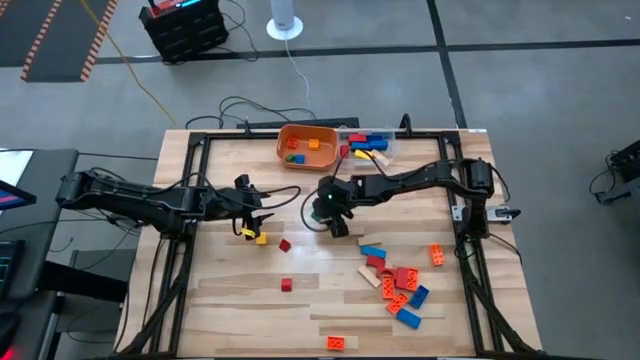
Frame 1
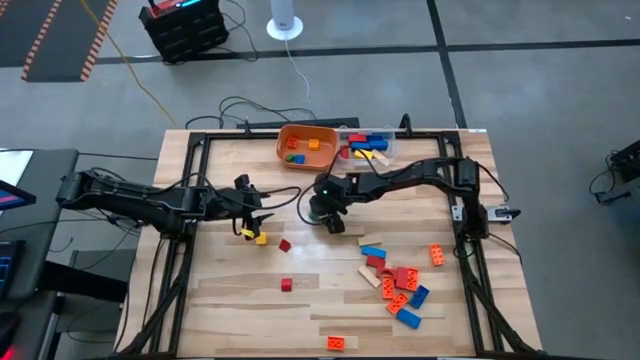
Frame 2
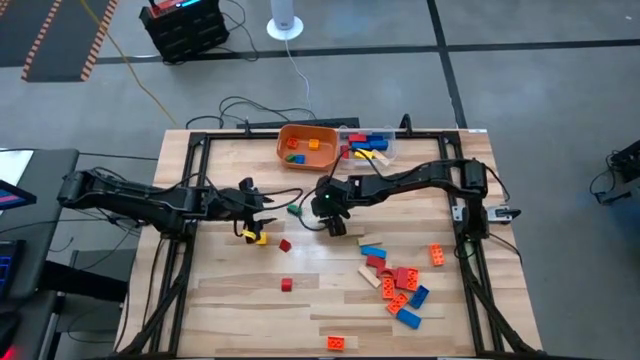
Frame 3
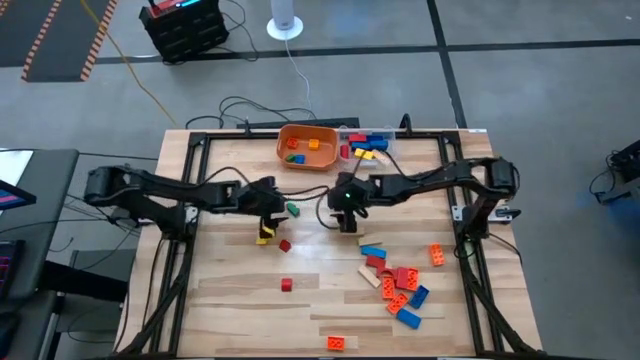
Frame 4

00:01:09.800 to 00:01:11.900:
Task: Sort blocks by size
Put the green small game piece into the orange bin

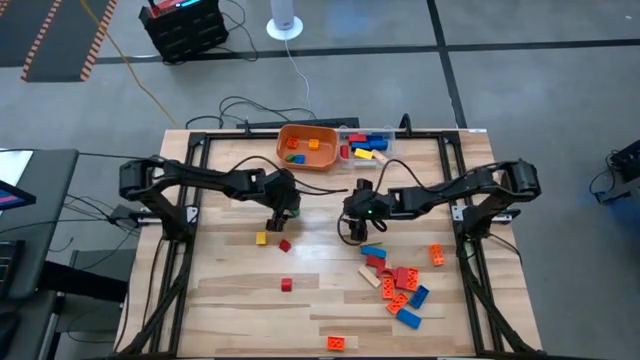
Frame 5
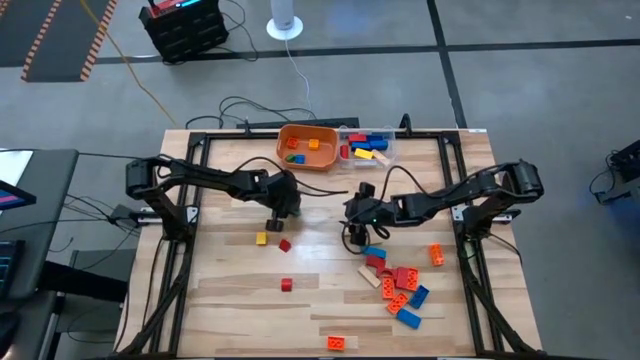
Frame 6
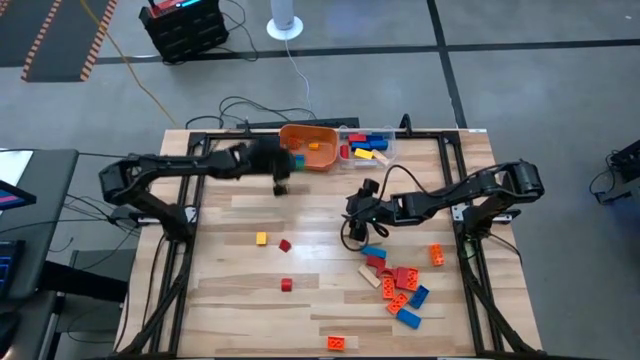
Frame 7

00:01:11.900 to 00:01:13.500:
Put the green small game piece into the orange bin

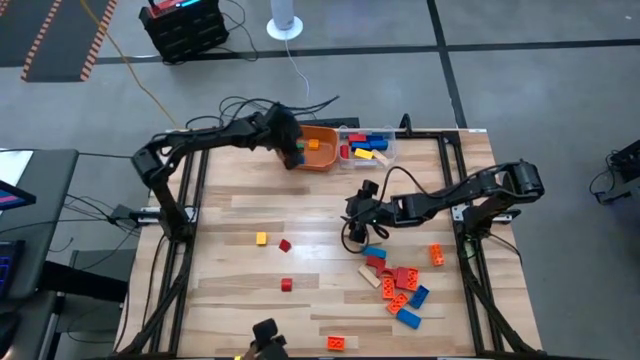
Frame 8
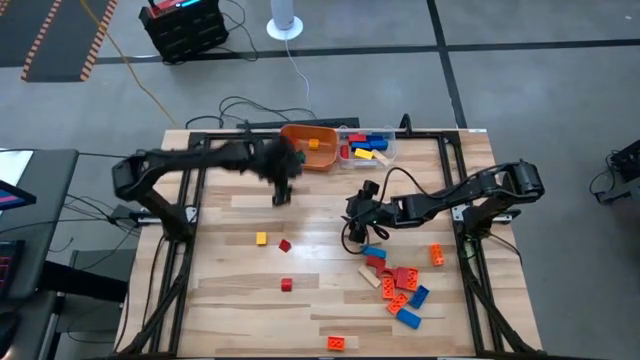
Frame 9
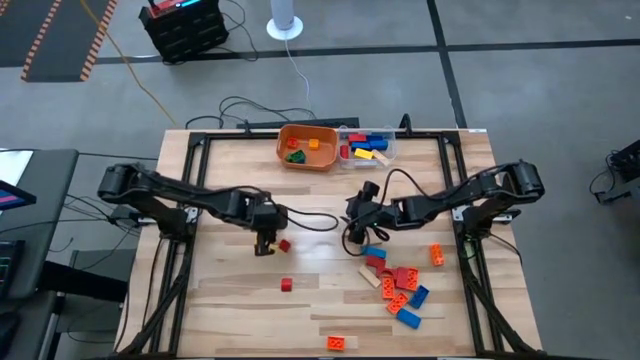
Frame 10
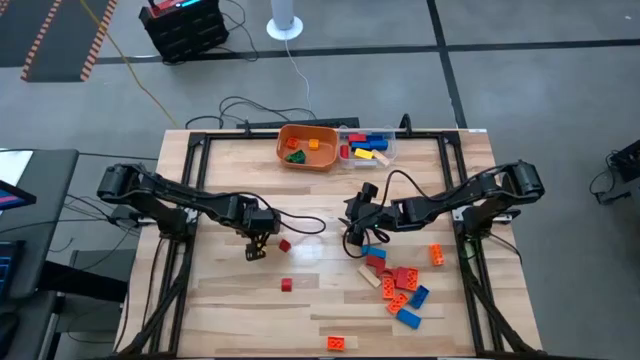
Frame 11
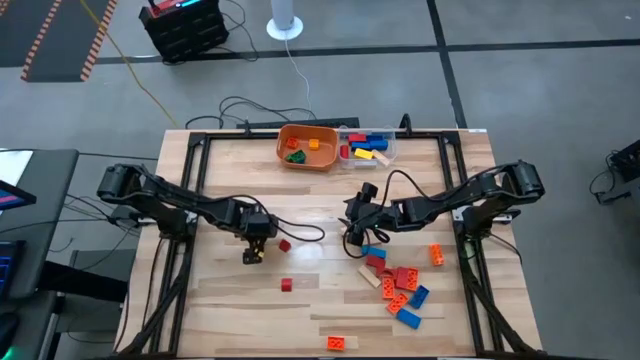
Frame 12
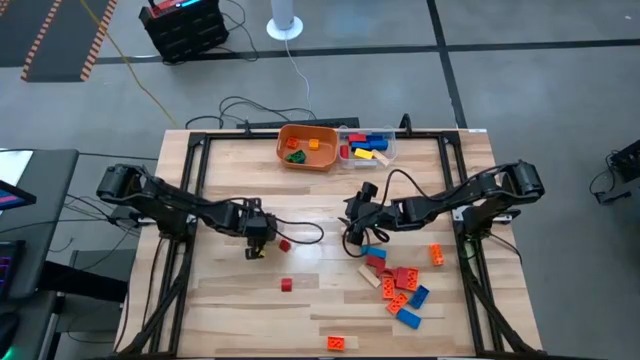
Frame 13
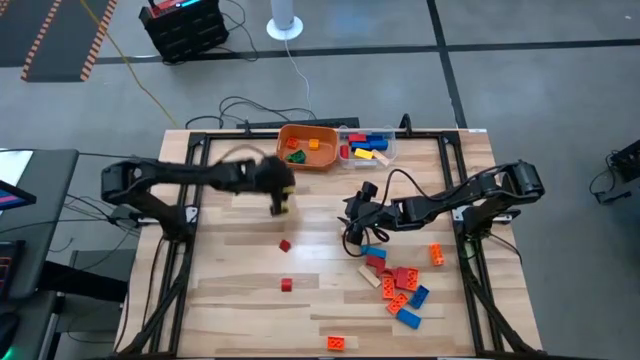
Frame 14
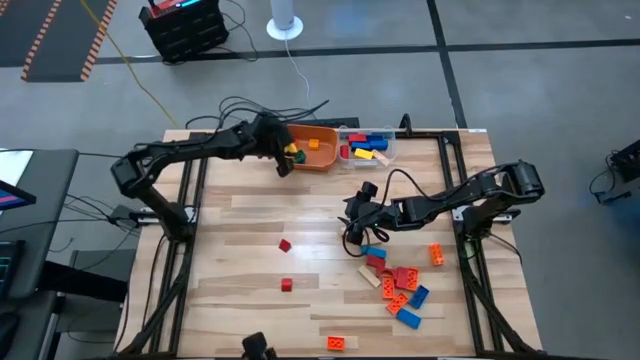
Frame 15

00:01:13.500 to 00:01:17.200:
Put the yellow small block into the orange bin

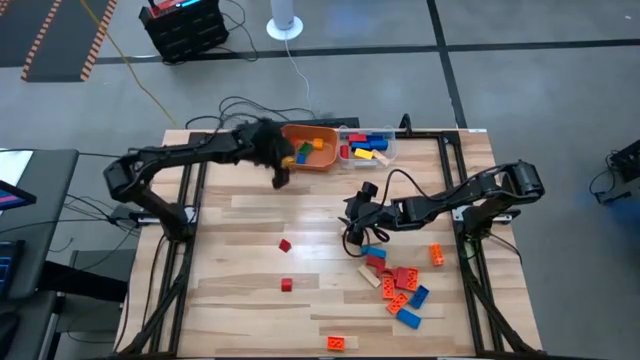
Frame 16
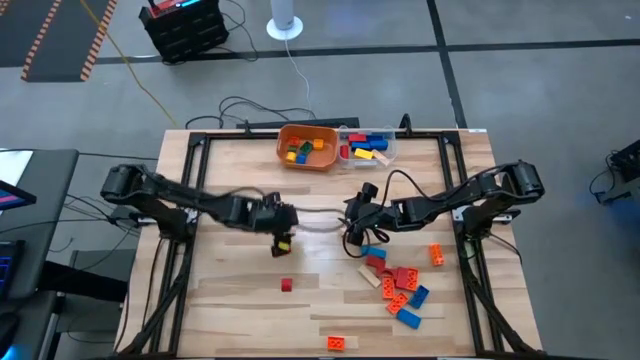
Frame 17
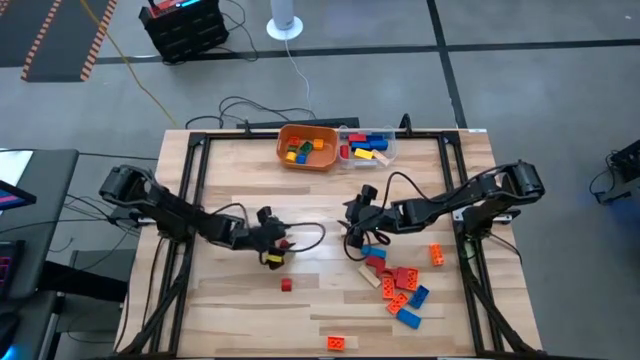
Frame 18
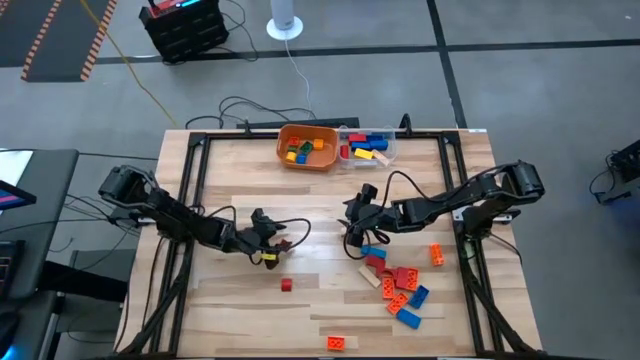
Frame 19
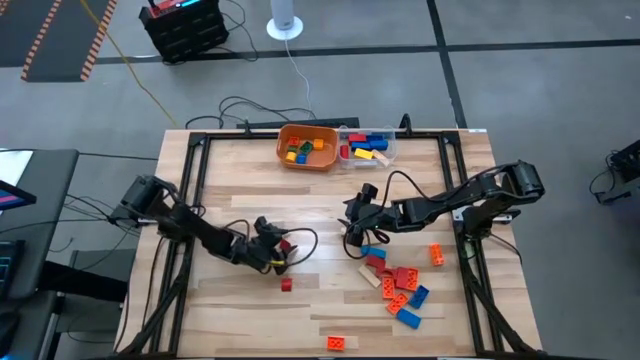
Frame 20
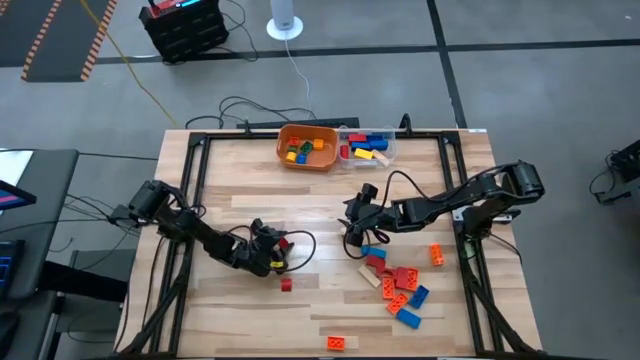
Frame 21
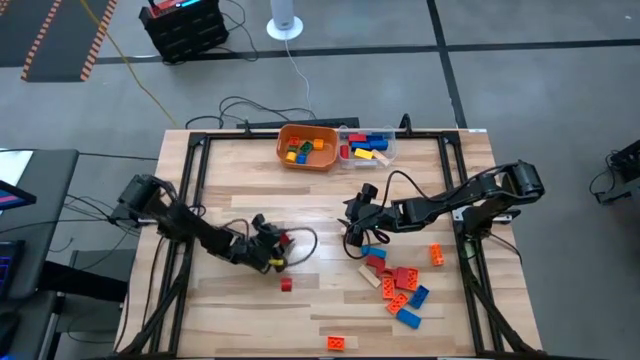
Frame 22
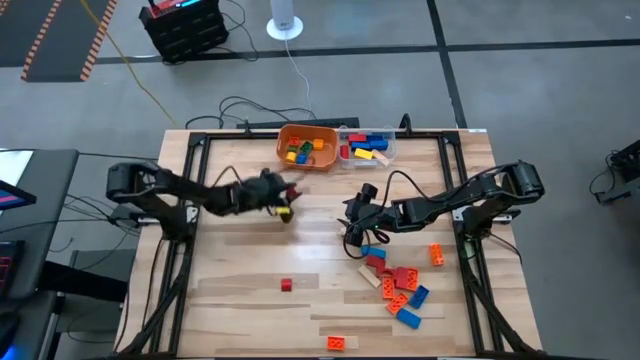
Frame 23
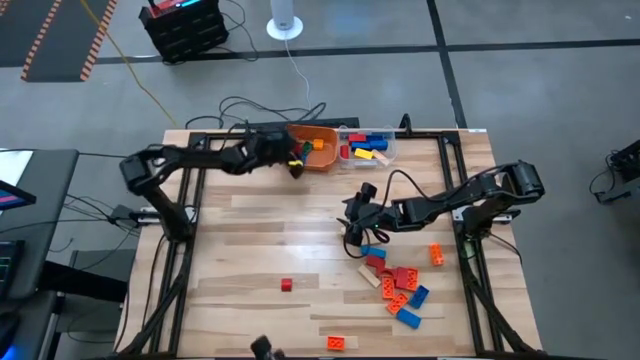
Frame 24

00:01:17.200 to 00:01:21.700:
Put the top small red block into the orange bin

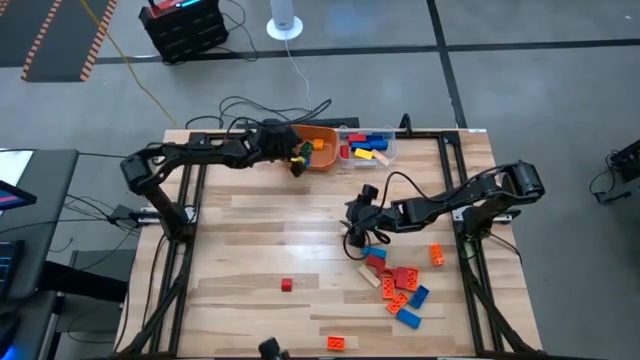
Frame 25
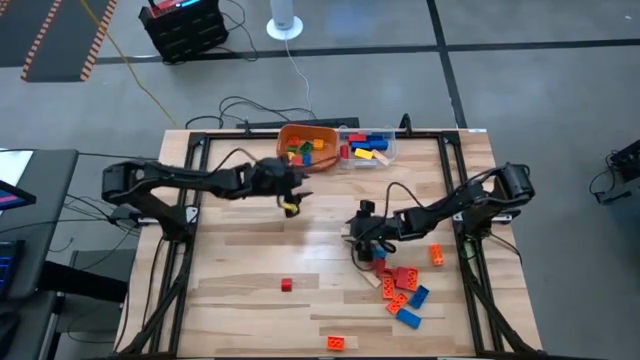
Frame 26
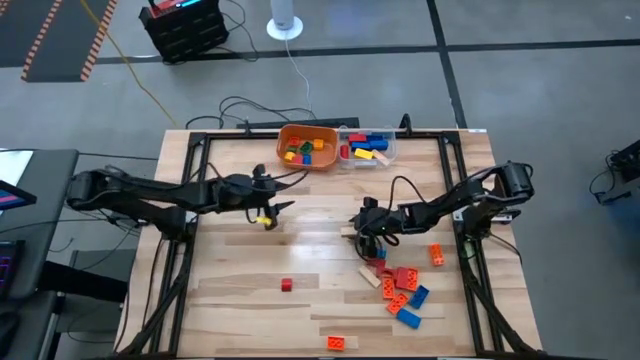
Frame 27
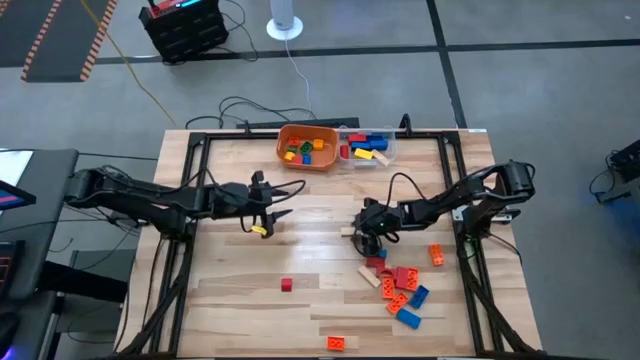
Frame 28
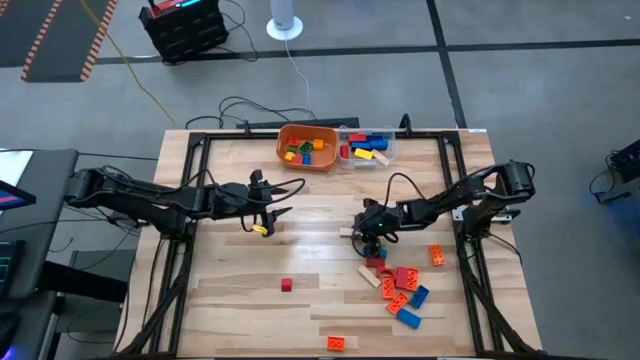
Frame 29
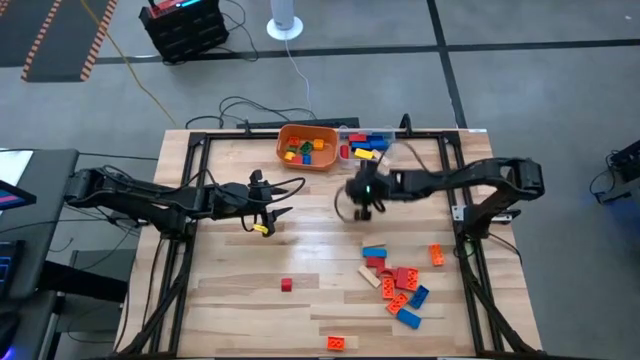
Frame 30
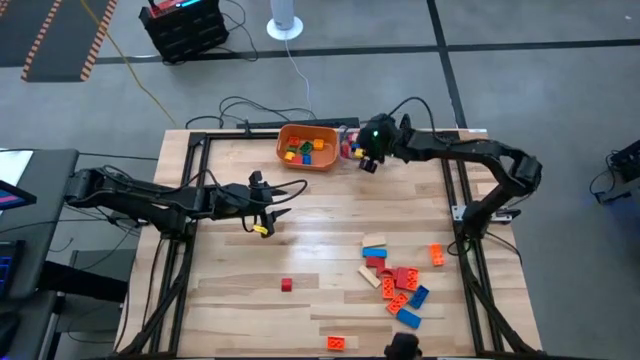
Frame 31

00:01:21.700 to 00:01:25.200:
Put the center wooden block into the transparent bin

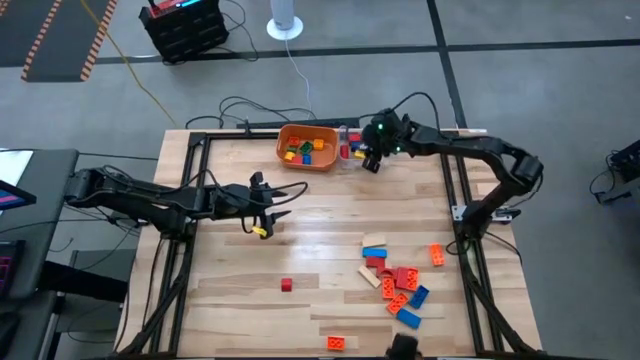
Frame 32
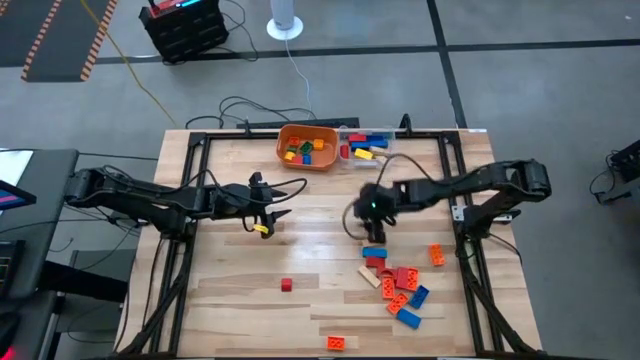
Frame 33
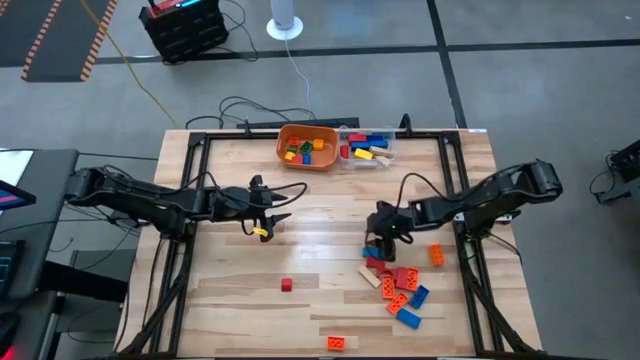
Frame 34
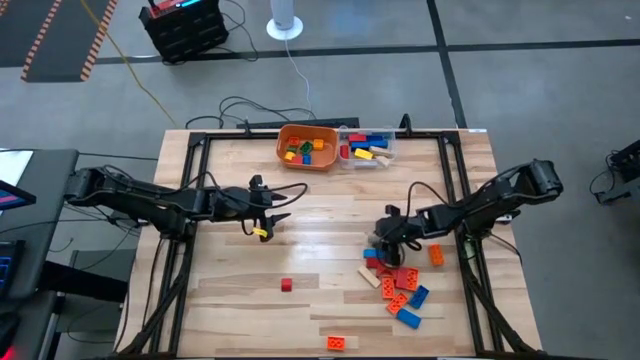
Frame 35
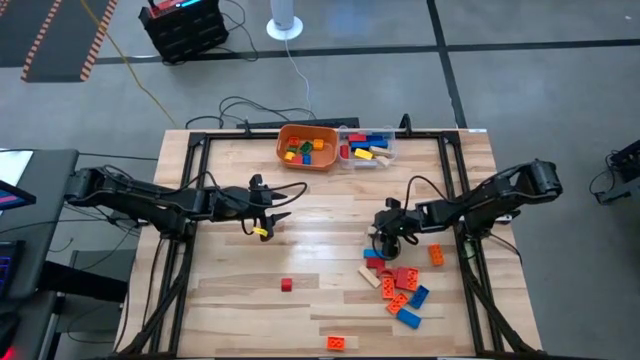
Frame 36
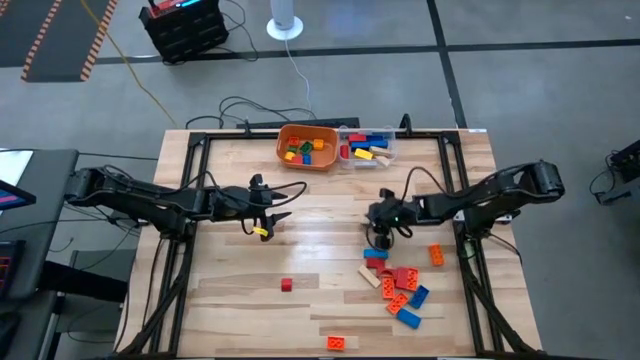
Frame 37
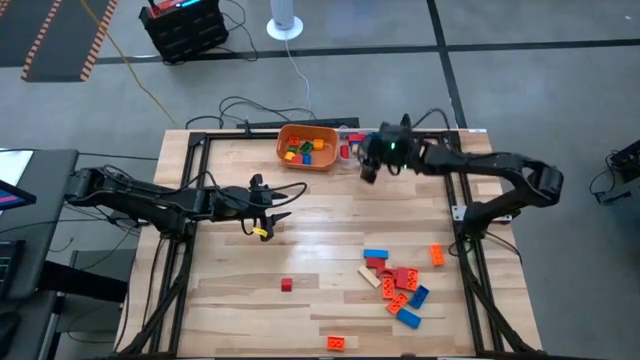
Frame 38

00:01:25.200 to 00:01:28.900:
Put the top wooden block into the transparent bin

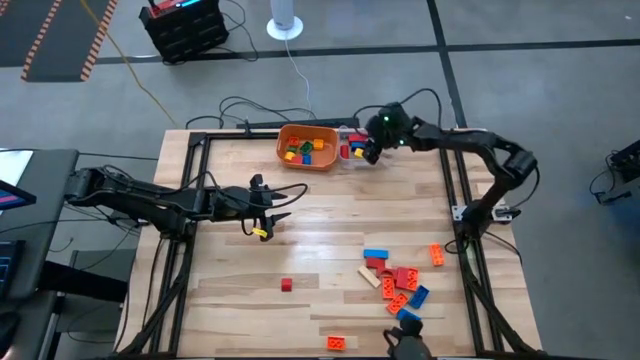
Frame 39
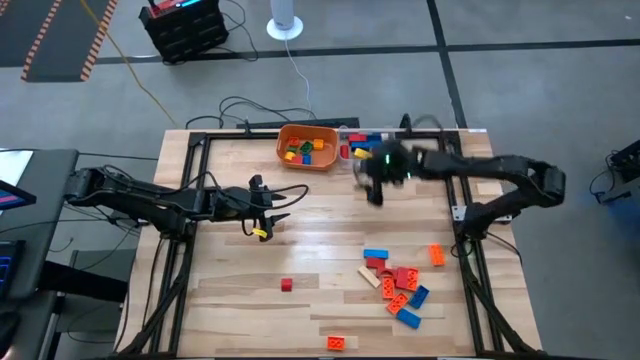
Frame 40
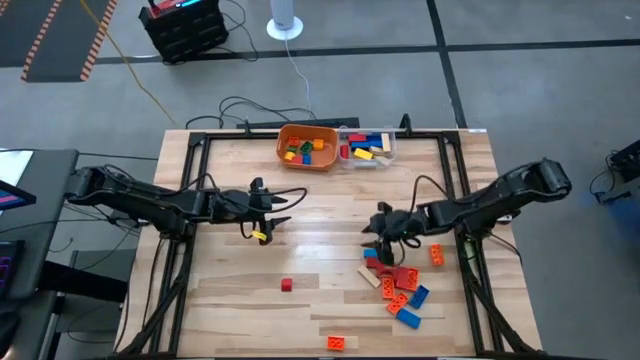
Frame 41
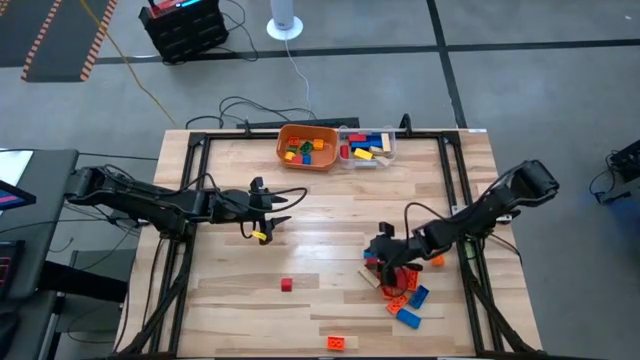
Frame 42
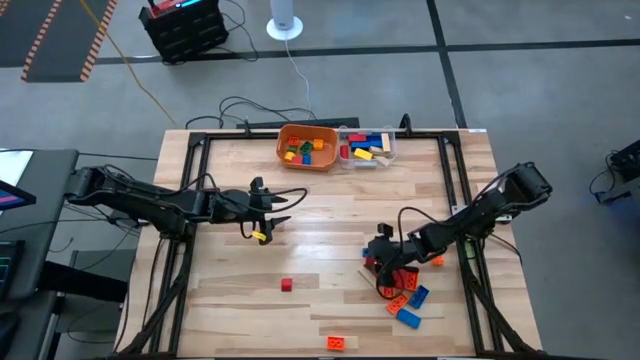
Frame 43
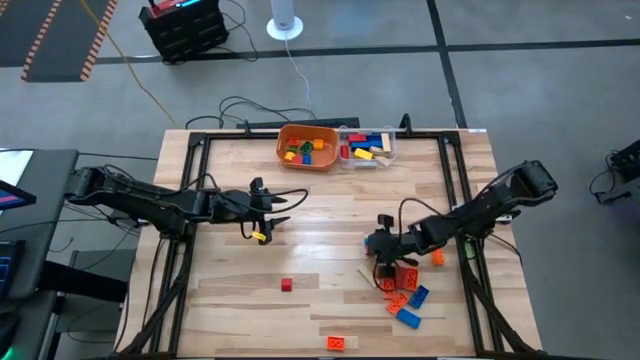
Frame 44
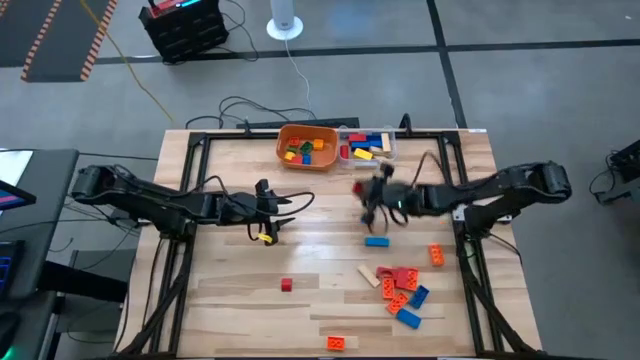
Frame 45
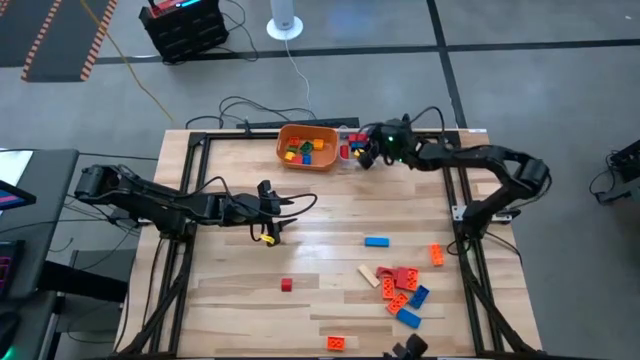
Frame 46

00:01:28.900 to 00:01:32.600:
Put the left red block into the transparent bin
